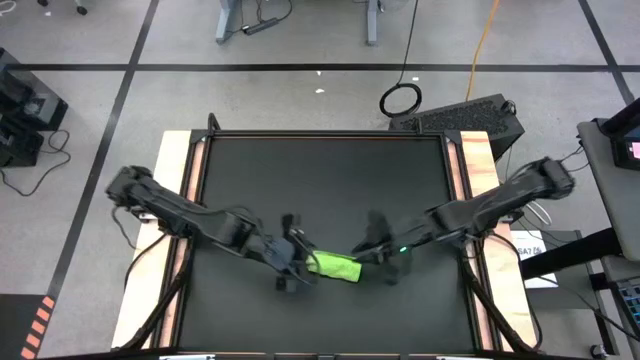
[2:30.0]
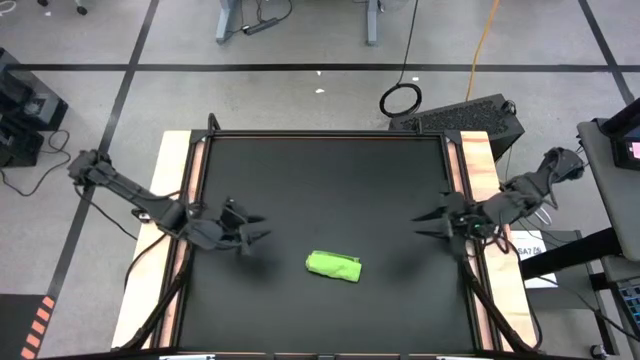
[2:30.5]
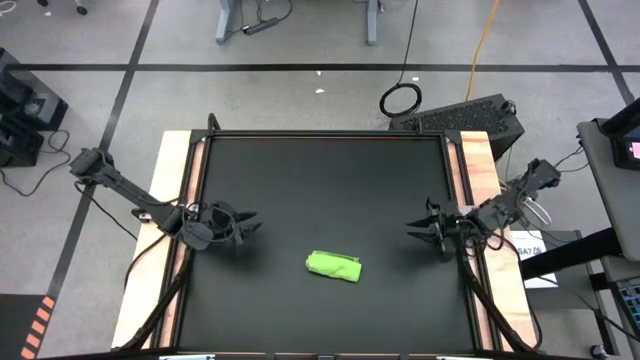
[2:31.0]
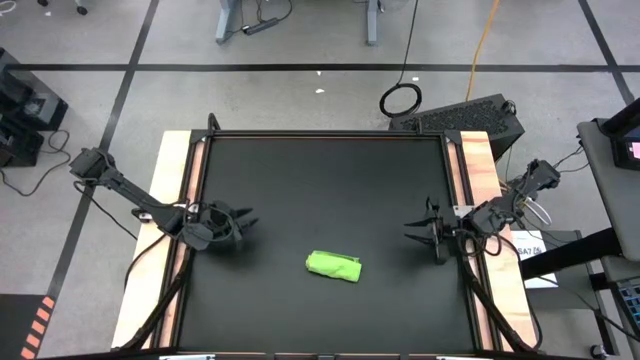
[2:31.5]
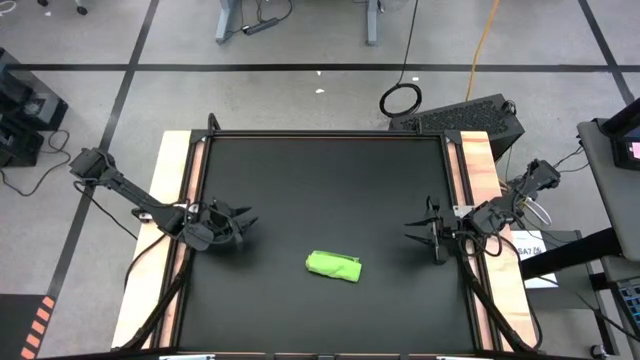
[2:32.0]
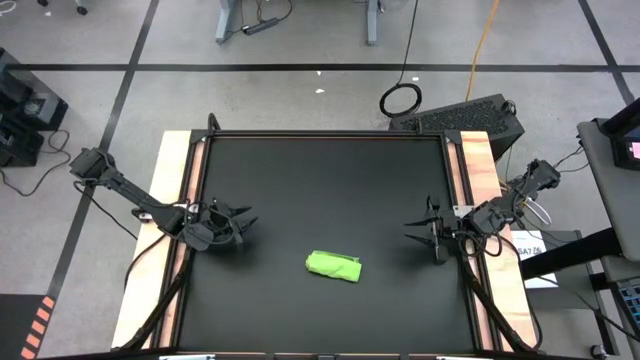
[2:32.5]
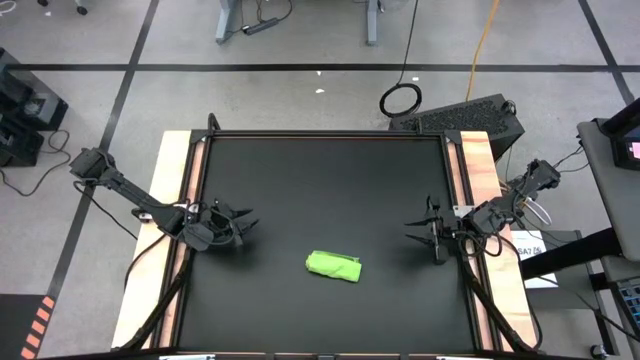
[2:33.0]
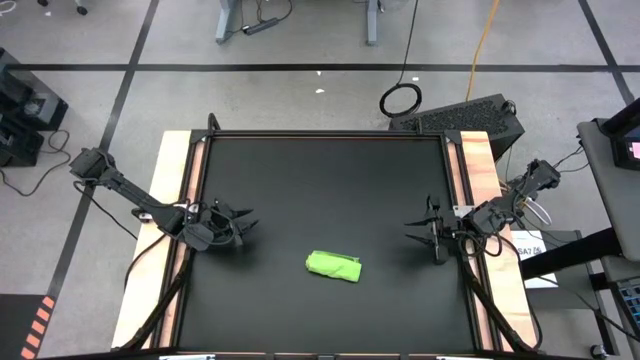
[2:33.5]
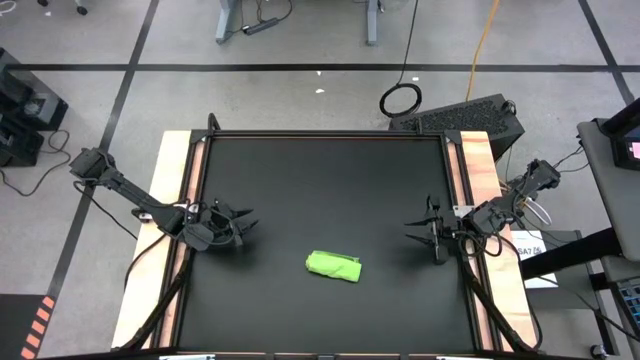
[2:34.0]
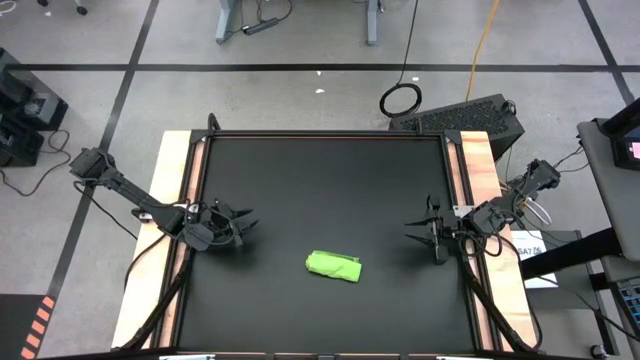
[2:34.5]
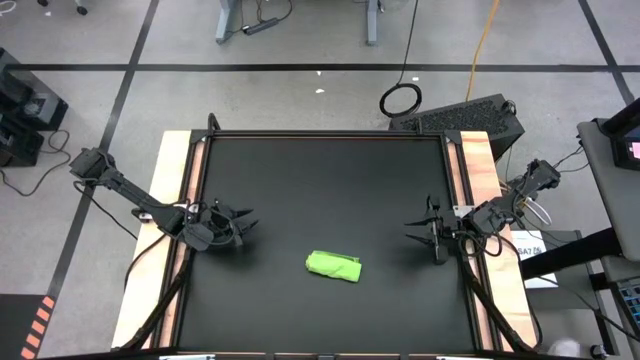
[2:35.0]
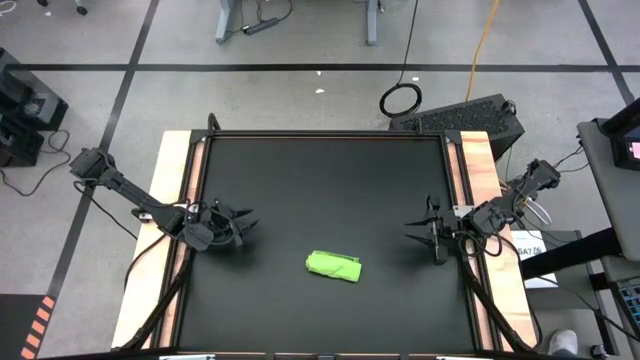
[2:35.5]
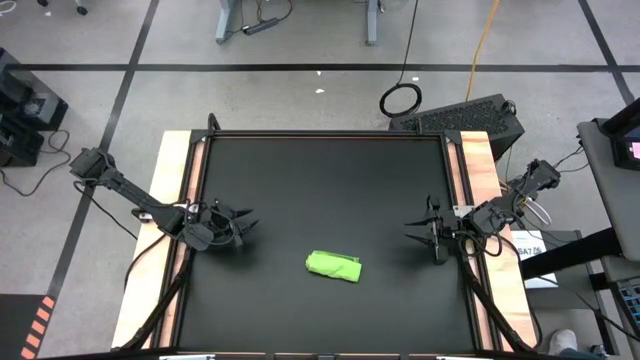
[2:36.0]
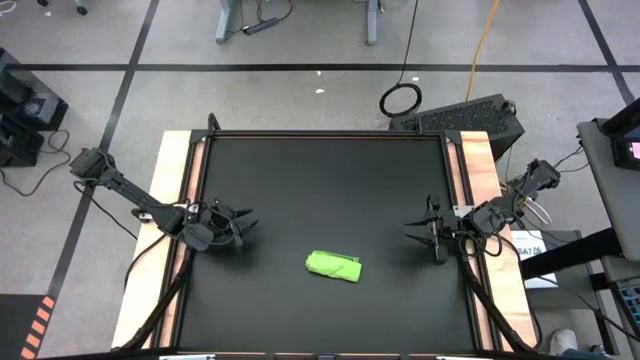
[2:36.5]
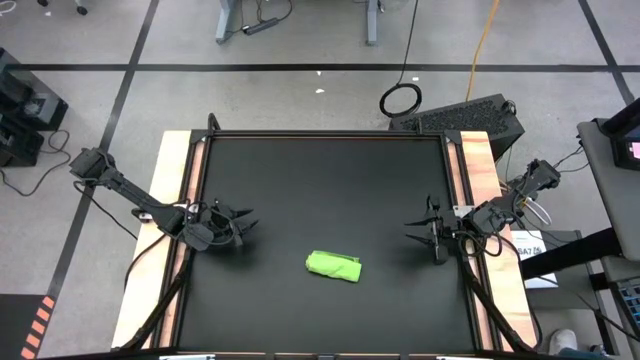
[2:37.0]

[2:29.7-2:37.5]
Task: Roll towel
Return to Home Position

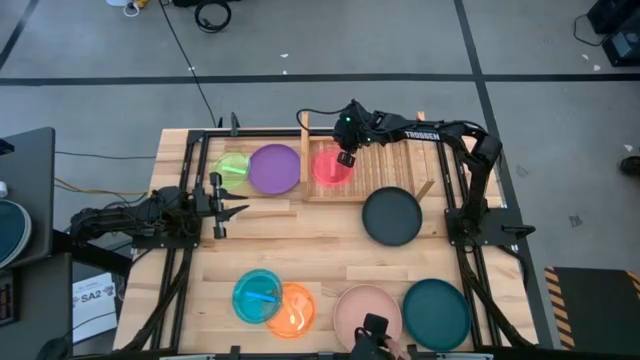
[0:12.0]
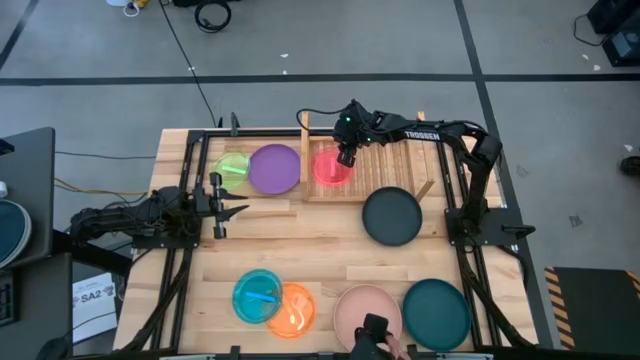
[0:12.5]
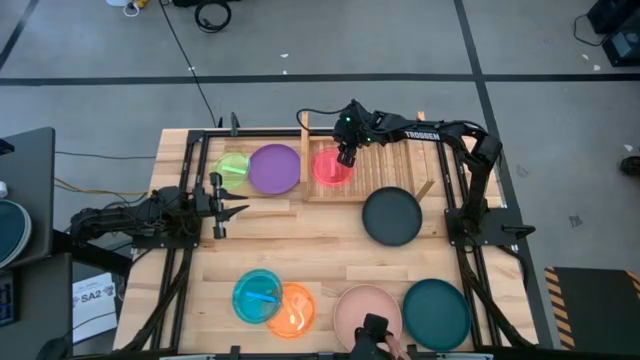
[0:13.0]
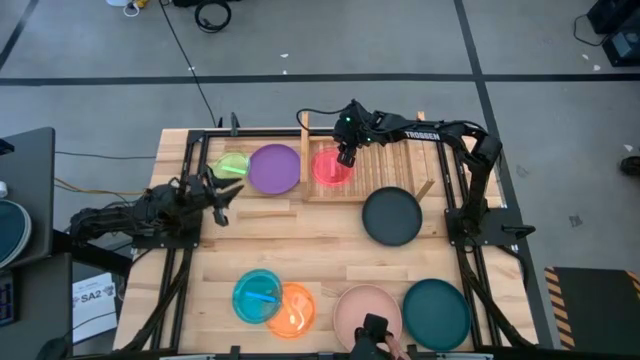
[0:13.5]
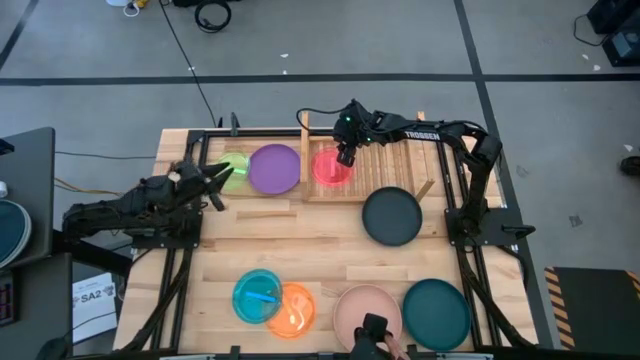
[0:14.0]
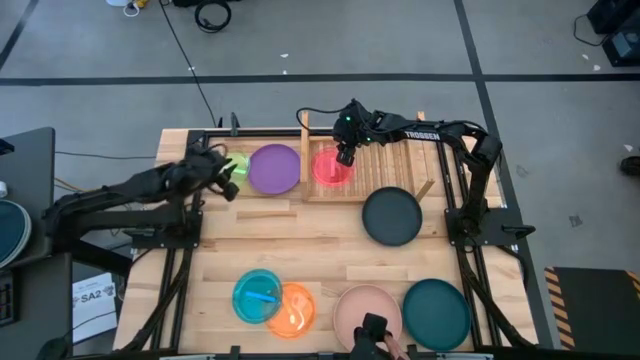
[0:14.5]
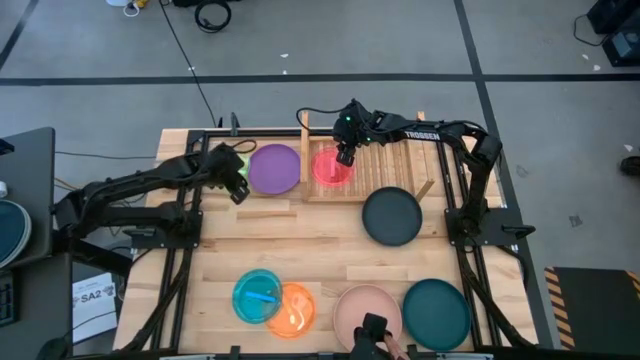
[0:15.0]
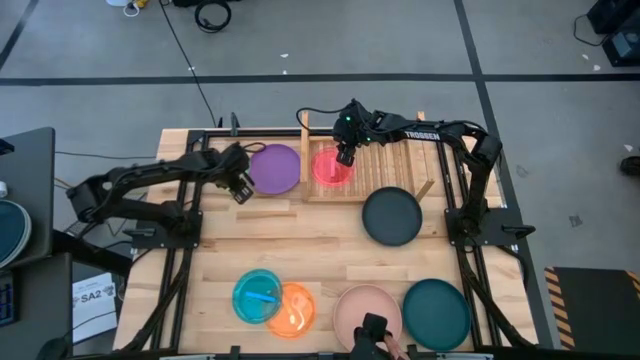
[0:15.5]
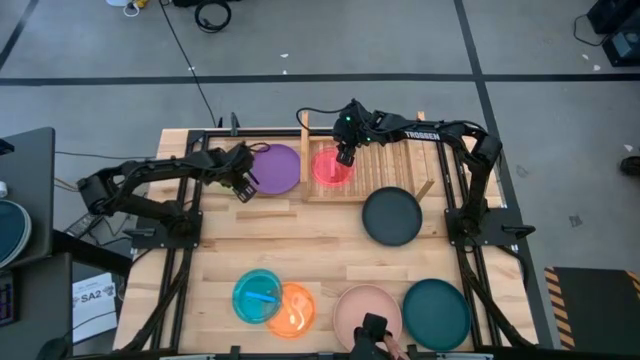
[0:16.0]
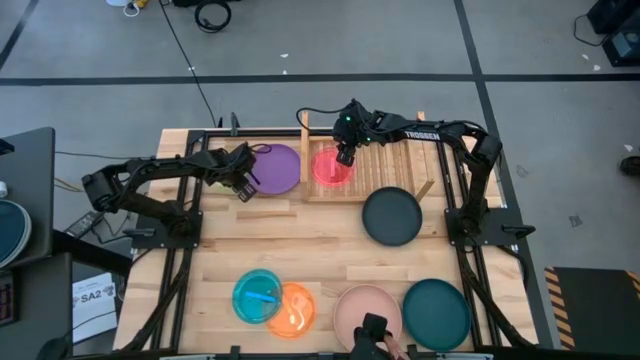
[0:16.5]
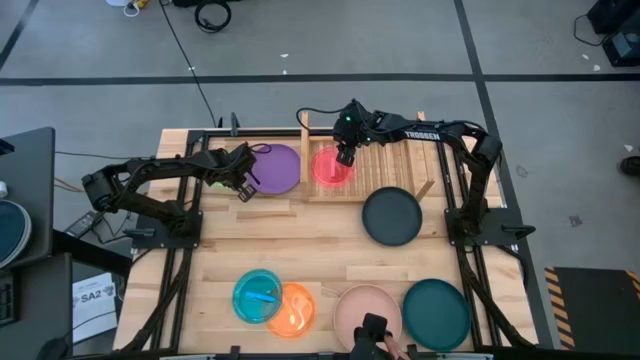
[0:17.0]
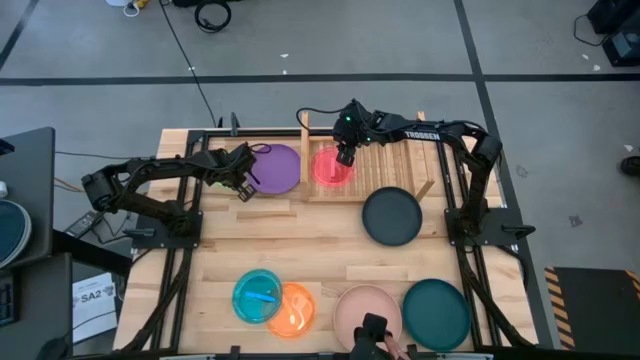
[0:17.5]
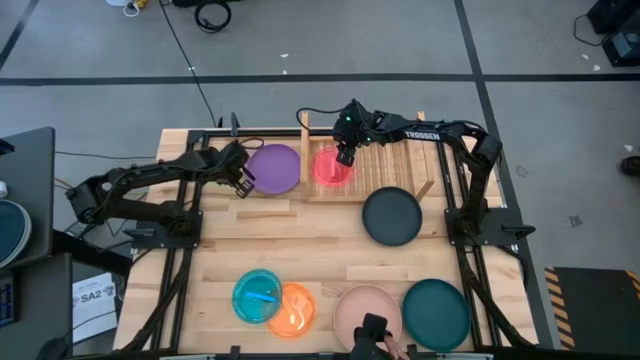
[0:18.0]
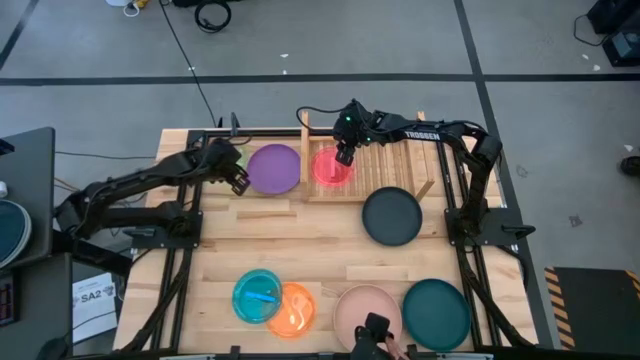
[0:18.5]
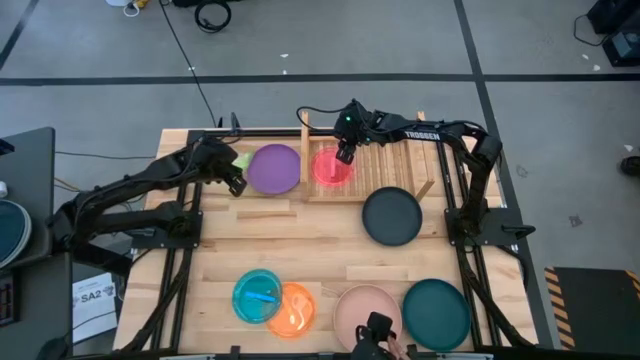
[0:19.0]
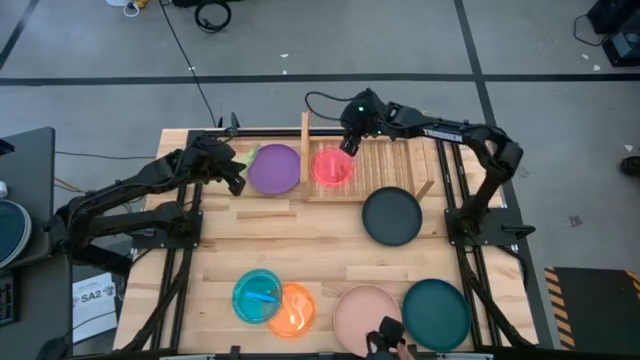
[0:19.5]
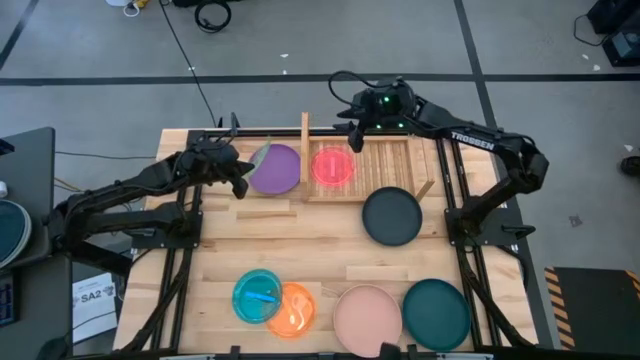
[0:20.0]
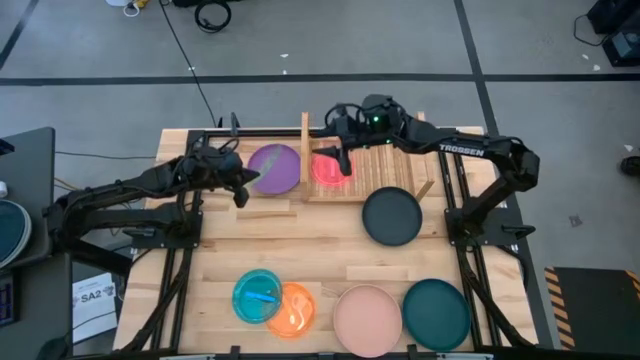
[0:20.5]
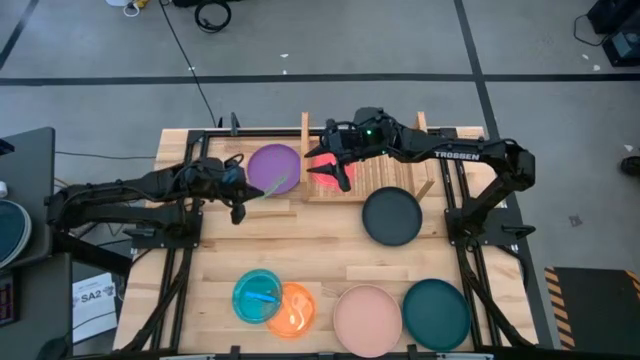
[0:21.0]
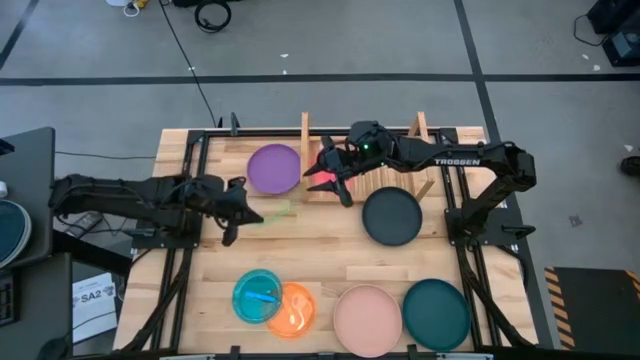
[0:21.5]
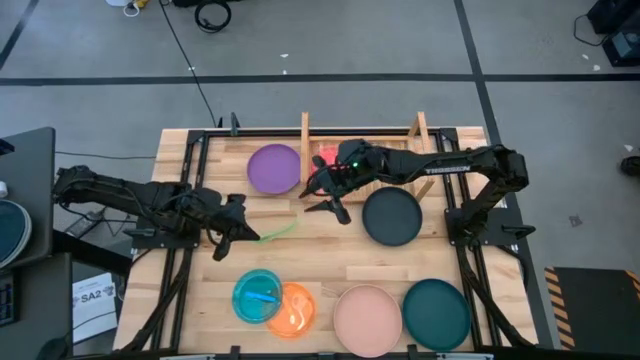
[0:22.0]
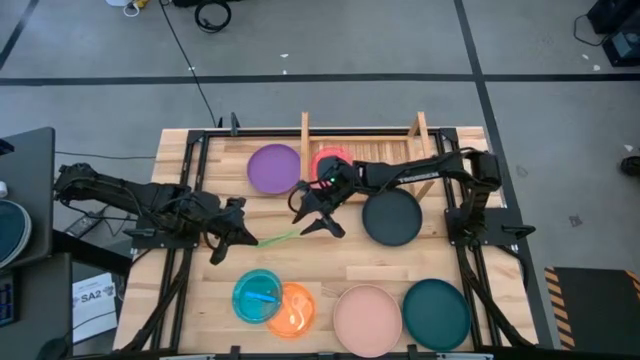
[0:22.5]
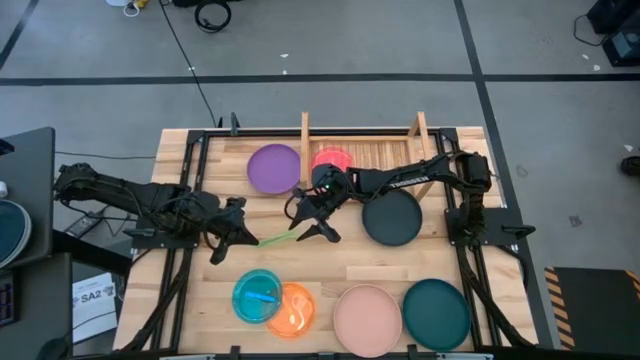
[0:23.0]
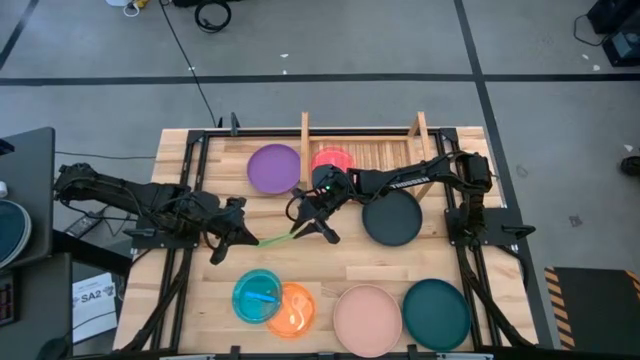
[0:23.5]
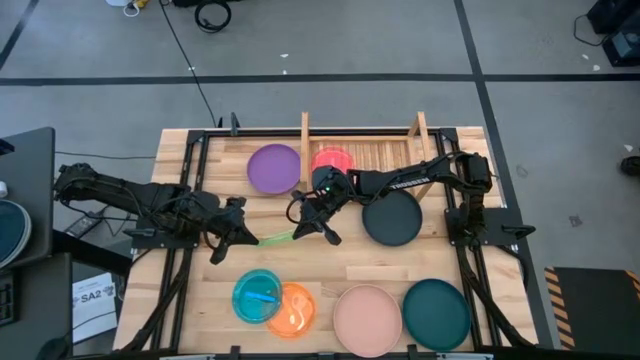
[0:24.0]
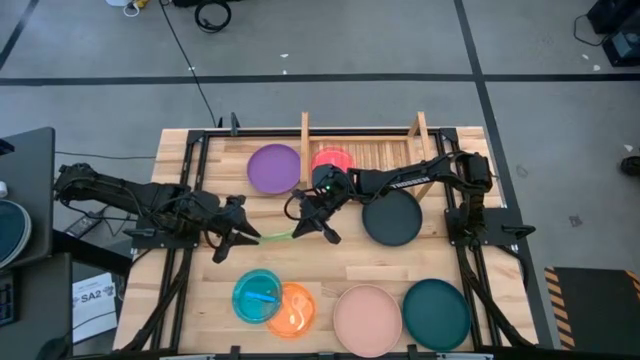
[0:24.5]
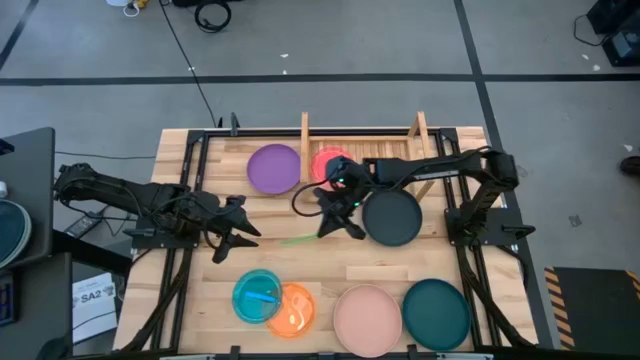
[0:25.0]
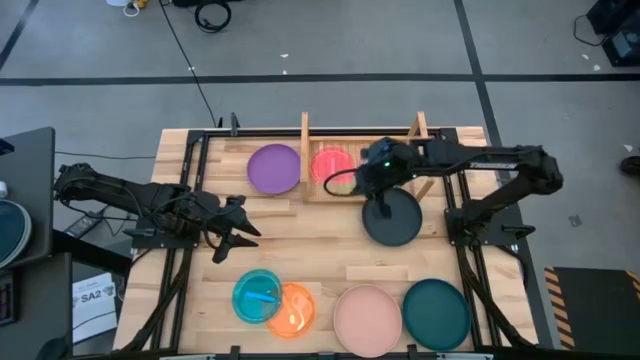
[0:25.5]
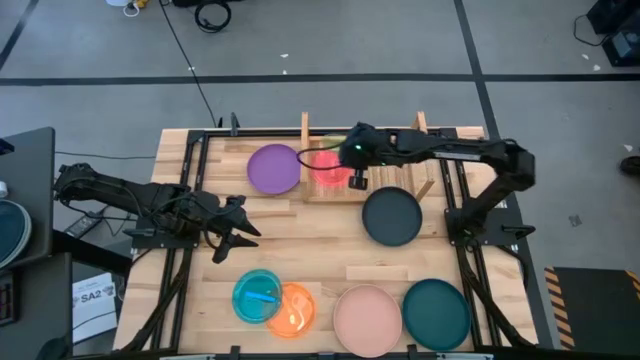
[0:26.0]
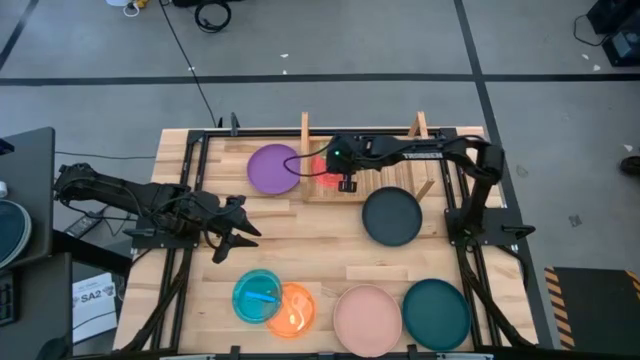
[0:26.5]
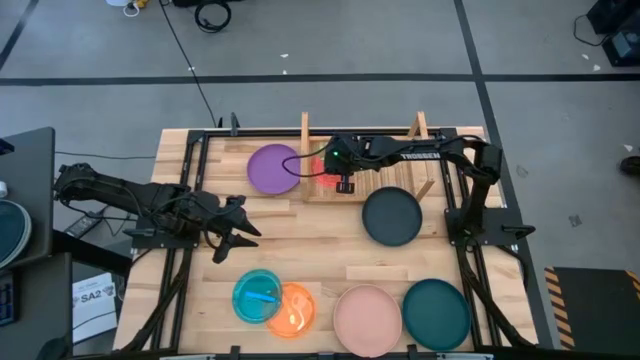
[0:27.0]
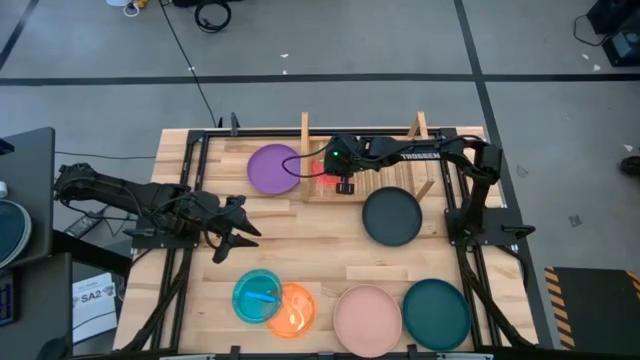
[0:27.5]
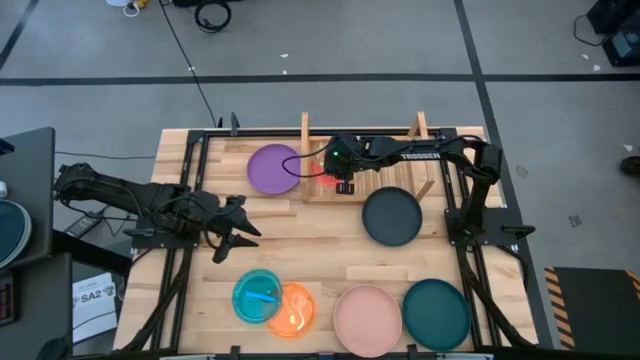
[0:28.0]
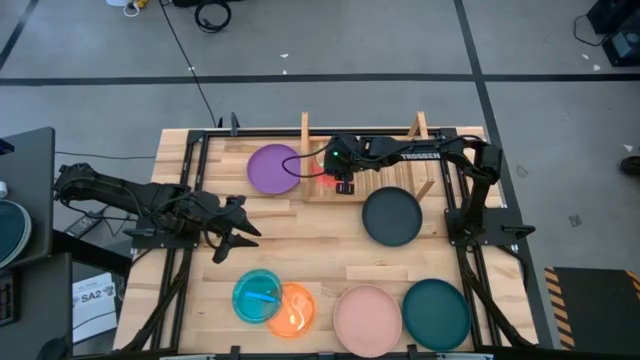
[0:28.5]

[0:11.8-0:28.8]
Task: Place and stack plates onto a shelf
Stack the small green plate on top of the small pink plate on the shelf
